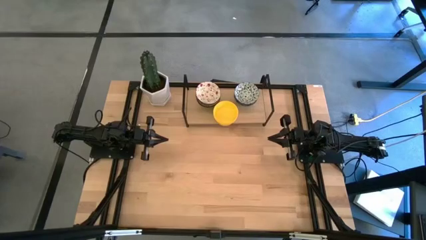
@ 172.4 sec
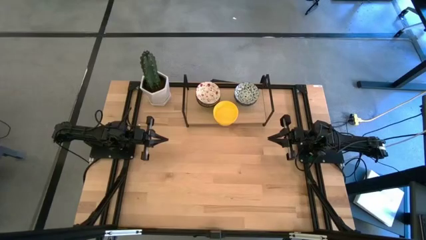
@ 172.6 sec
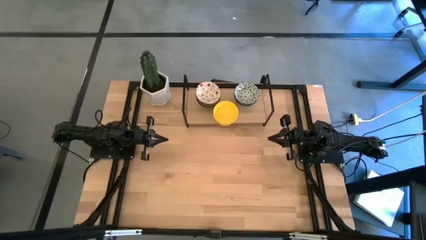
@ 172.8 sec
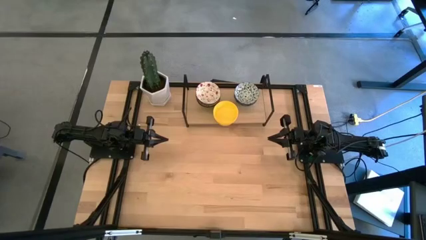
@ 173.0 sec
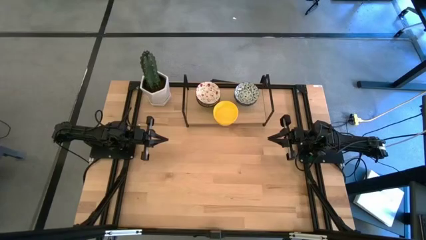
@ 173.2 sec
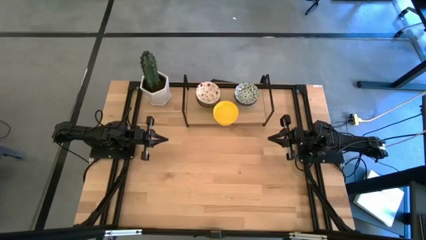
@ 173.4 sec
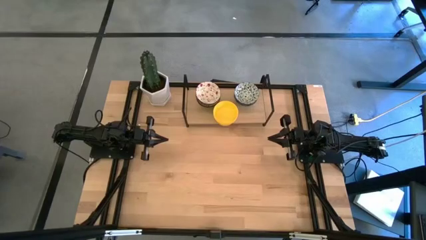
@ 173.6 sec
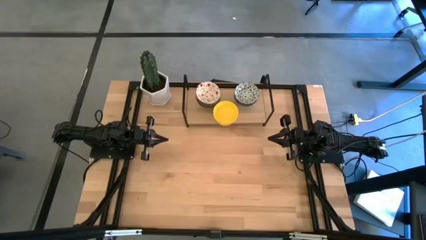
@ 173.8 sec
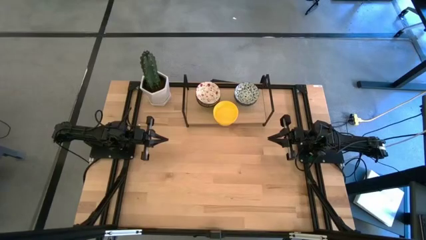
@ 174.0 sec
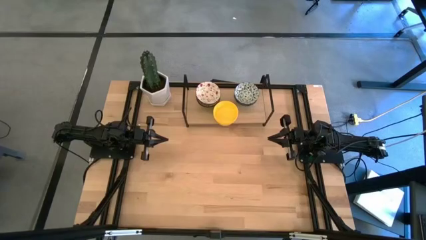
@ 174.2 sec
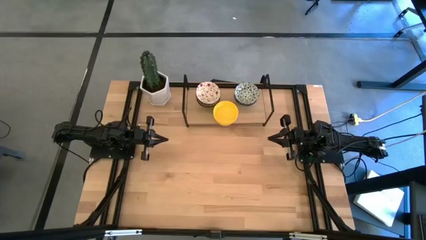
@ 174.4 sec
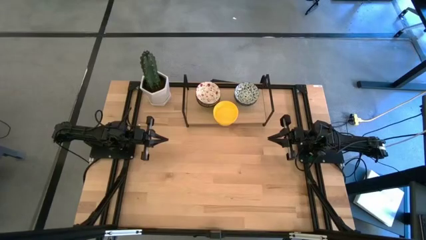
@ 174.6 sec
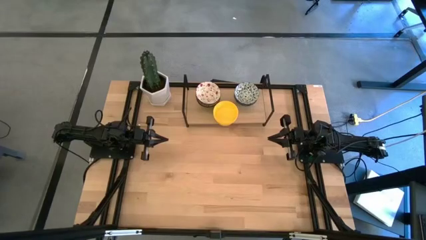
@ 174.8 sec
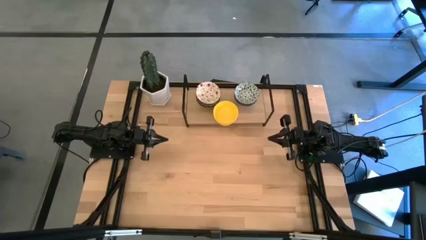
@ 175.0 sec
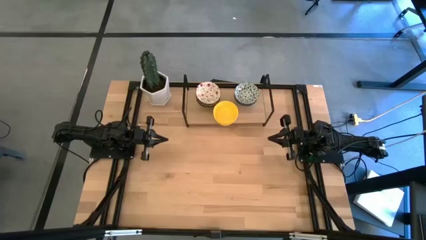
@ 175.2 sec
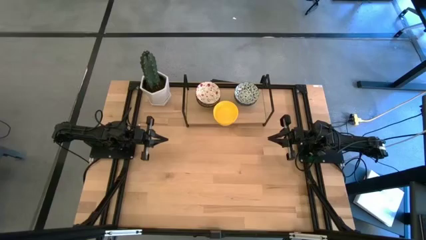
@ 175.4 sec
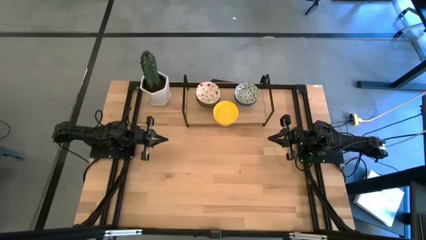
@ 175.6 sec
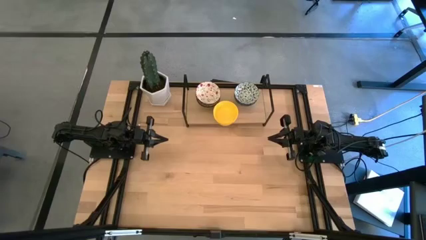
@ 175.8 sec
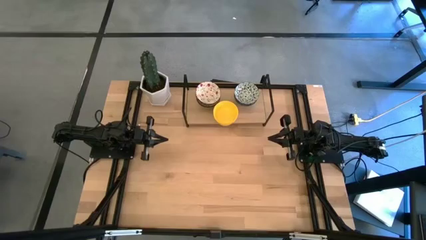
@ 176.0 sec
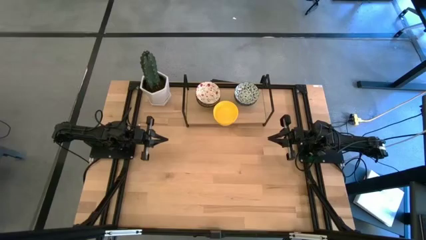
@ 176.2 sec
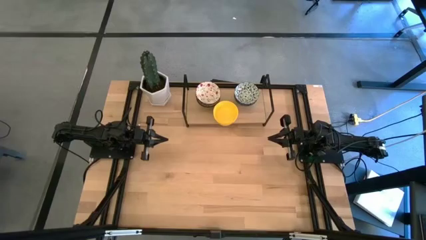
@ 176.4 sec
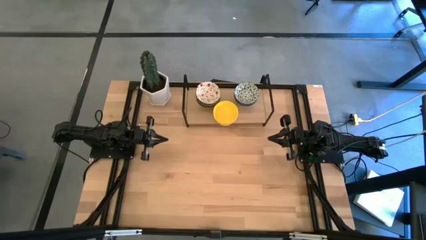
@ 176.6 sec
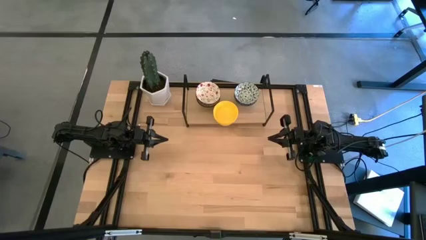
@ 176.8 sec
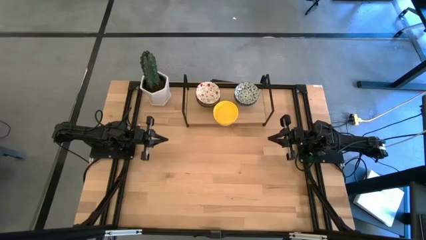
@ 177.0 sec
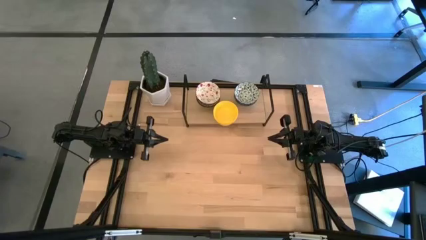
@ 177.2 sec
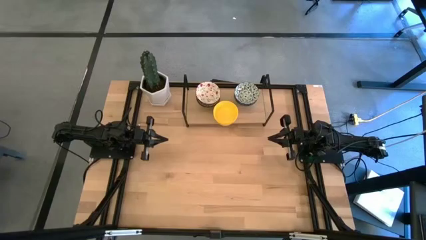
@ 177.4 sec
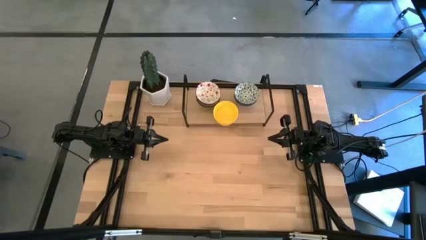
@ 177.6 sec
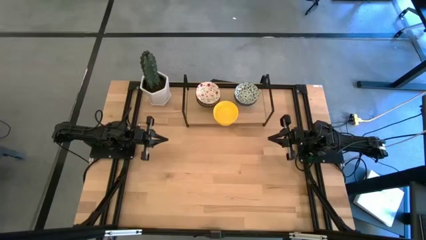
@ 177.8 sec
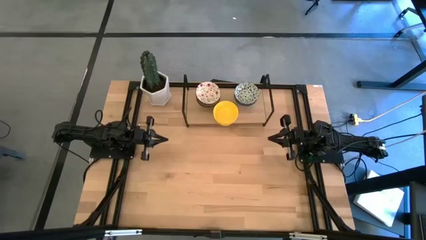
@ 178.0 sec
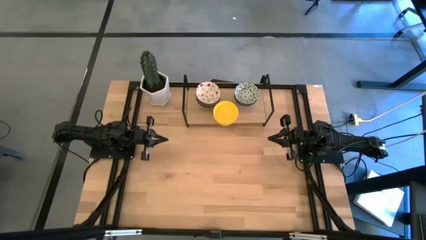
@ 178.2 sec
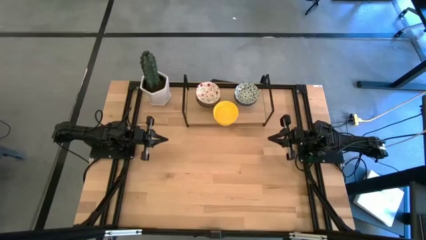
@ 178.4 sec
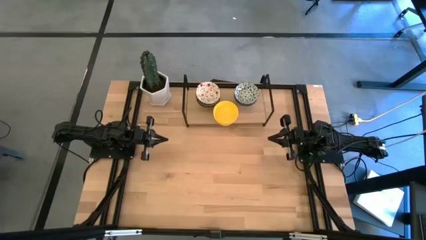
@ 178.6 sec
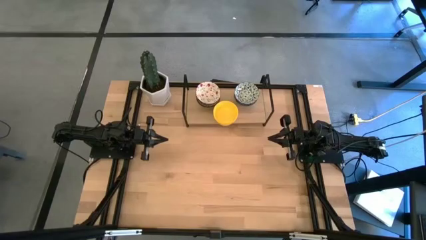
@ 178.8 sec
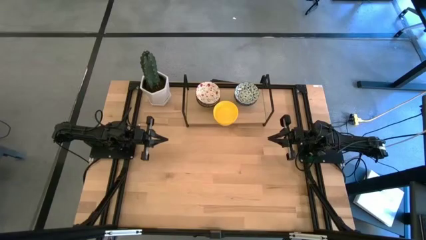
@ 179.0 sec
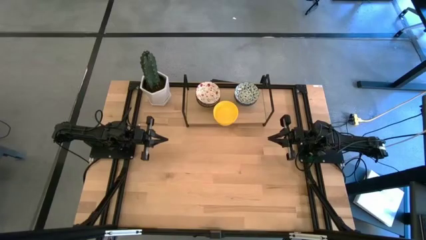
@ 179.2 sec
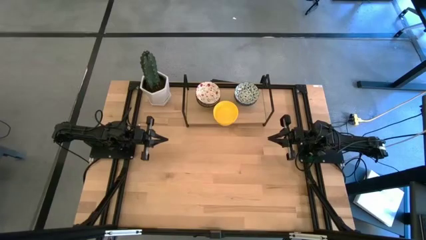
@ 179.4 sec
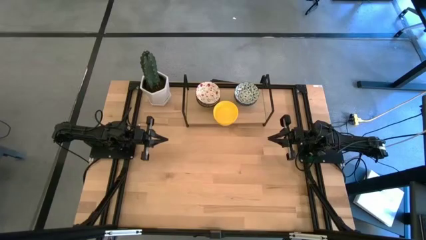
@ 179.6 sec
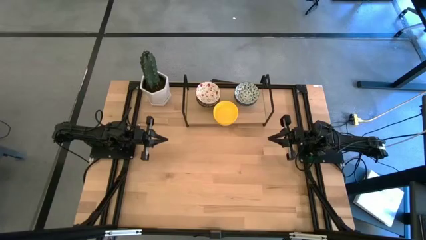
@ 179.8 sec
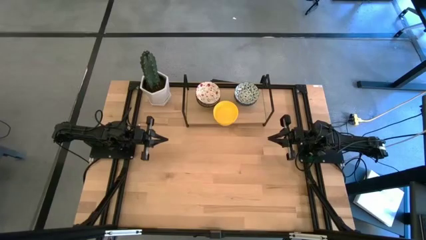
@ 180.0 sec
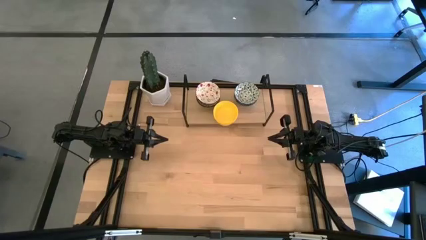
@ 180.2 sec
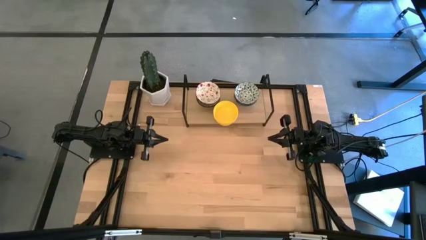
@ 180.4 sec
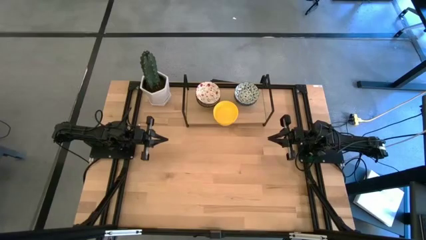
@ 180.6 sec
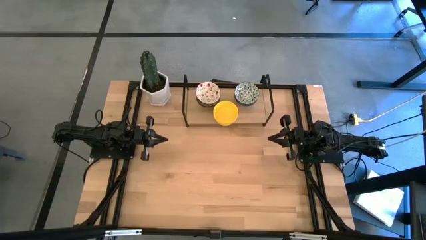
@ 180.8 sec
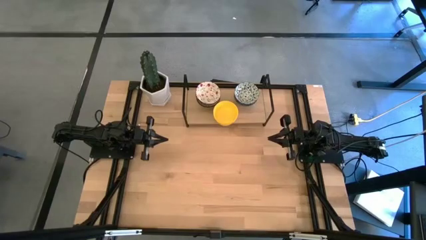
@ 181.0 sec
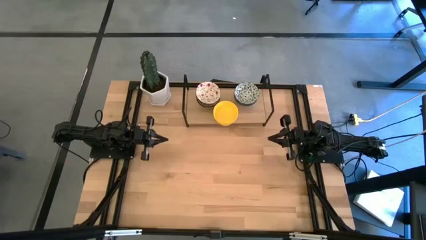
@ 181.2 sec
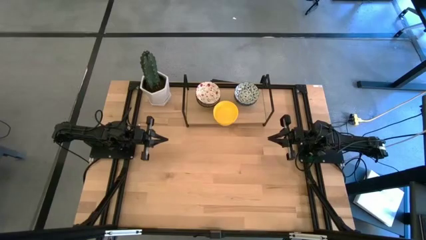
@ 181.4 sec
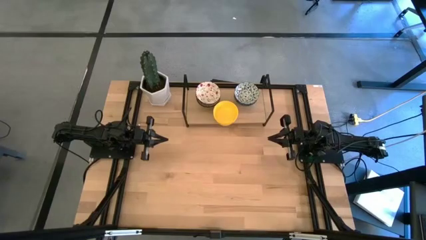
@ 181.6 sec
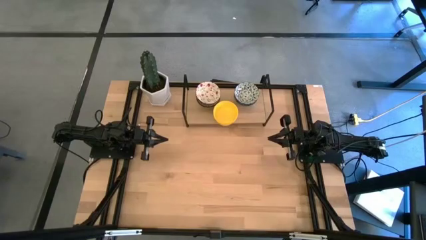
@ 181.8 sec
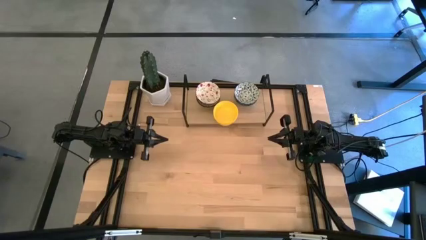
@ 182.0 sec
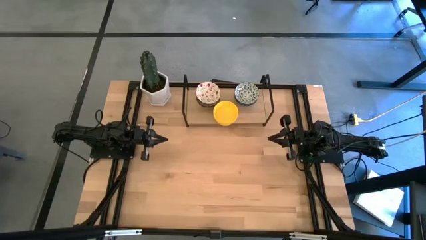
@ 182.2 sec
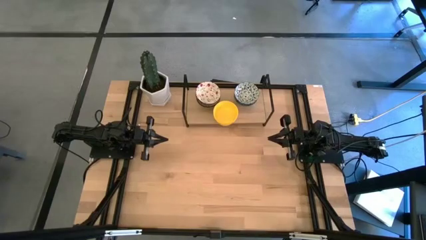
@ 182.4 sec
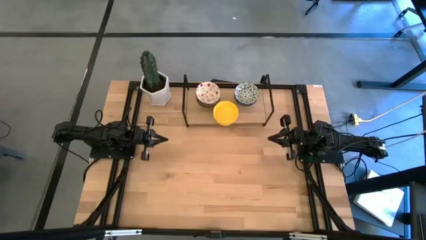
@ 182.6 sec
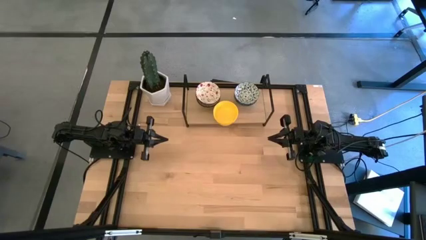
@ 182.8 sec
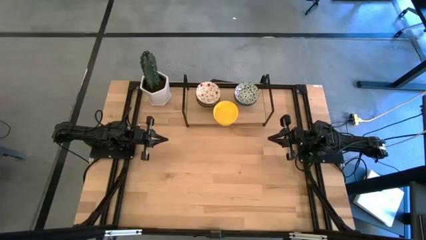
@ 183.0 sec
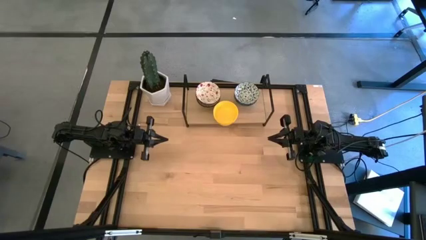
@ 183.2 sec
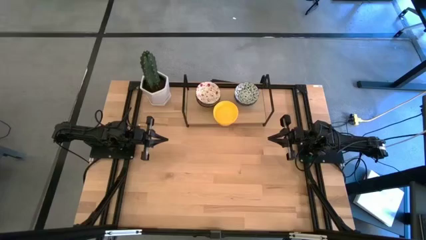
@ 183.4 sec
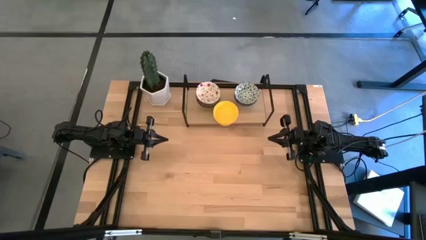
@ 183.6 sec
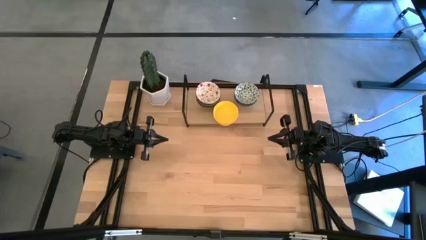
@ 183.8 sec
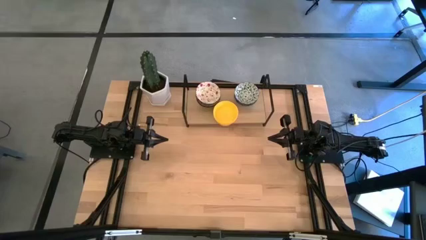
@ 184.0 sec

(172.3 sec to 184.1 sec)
Task: Pick & Place Mini bowls
Return to Home Position

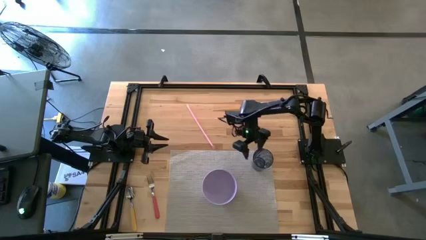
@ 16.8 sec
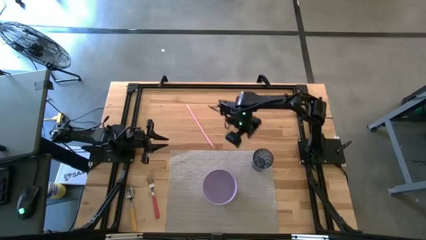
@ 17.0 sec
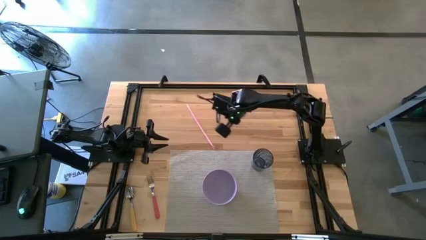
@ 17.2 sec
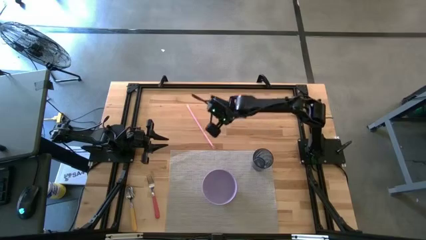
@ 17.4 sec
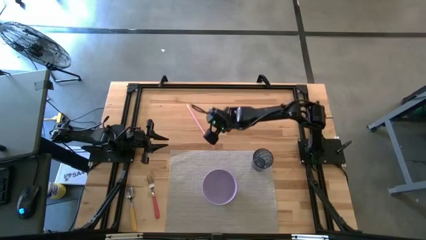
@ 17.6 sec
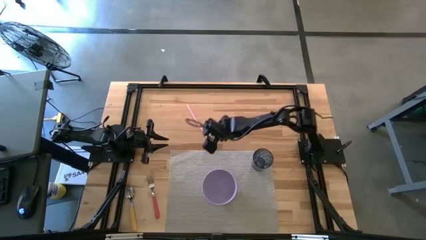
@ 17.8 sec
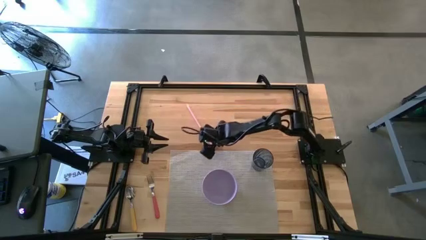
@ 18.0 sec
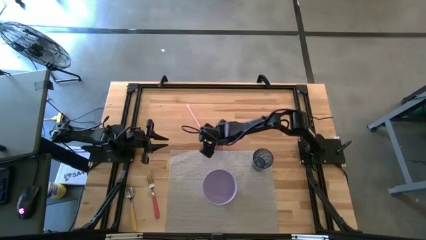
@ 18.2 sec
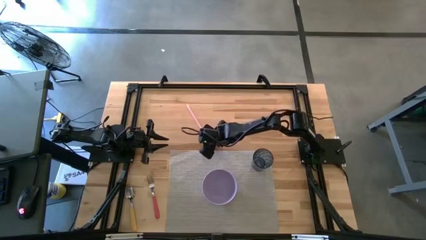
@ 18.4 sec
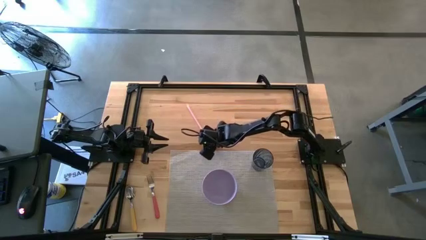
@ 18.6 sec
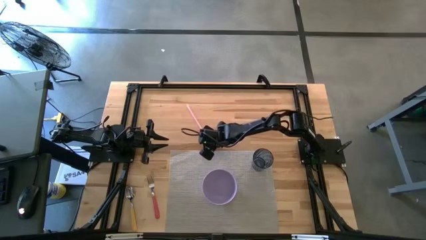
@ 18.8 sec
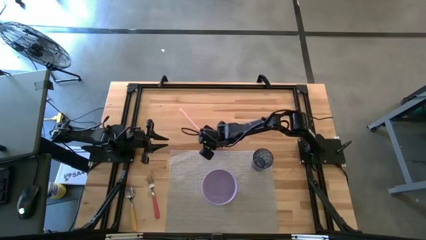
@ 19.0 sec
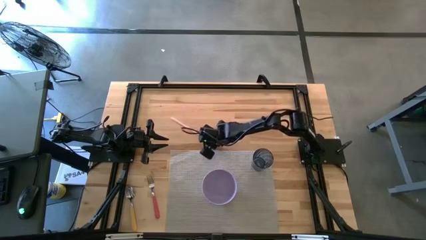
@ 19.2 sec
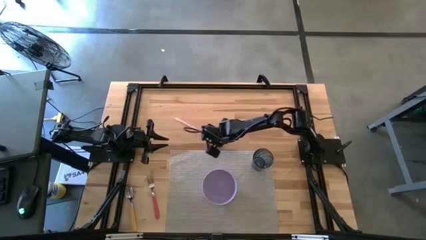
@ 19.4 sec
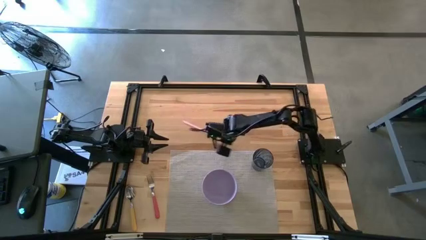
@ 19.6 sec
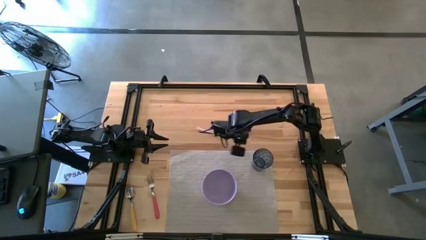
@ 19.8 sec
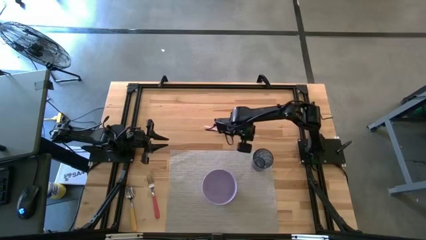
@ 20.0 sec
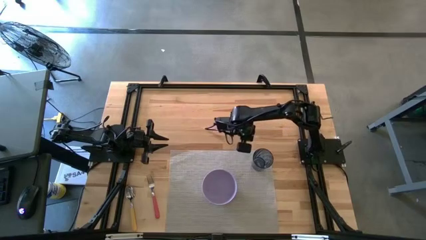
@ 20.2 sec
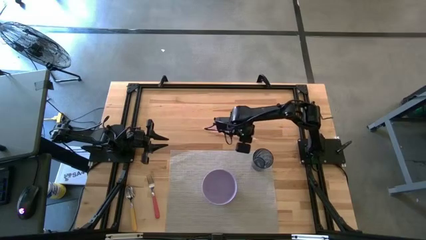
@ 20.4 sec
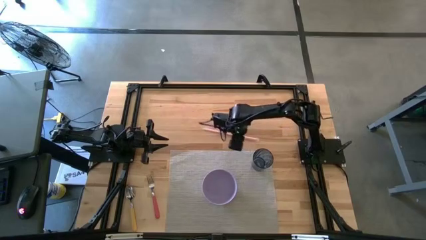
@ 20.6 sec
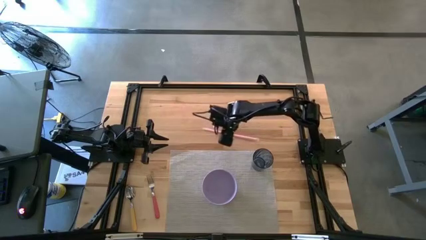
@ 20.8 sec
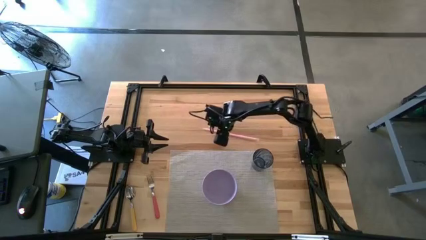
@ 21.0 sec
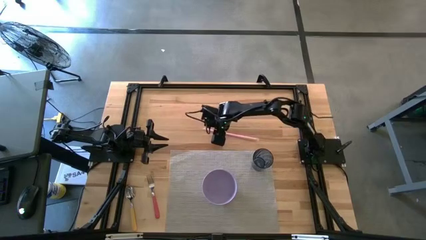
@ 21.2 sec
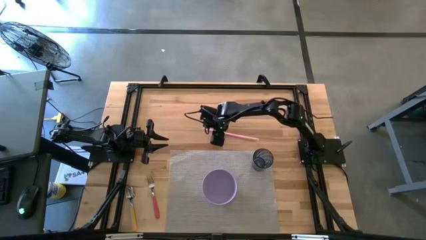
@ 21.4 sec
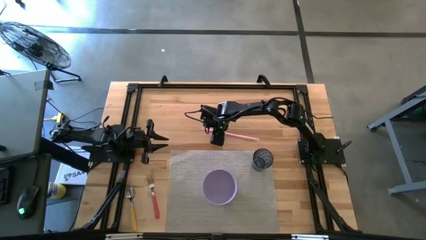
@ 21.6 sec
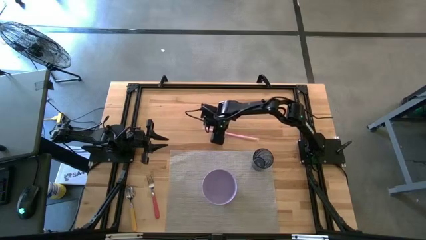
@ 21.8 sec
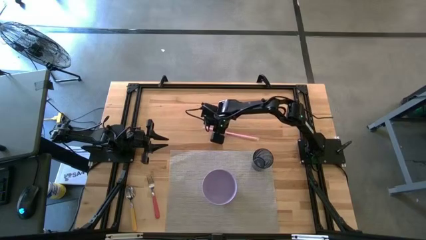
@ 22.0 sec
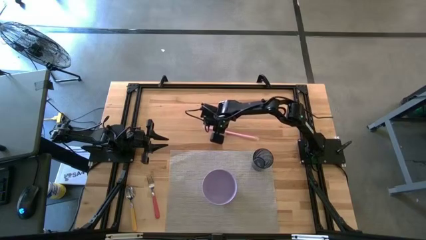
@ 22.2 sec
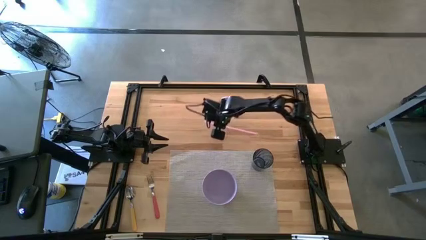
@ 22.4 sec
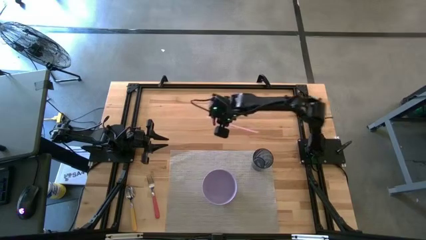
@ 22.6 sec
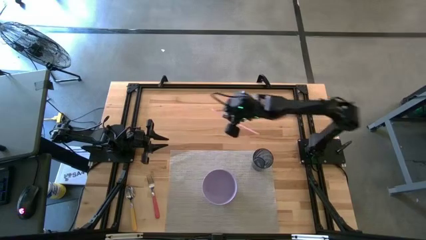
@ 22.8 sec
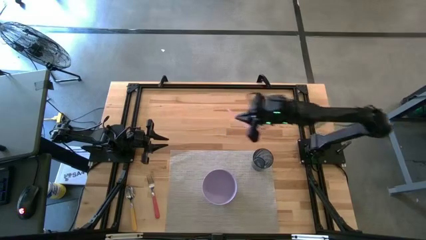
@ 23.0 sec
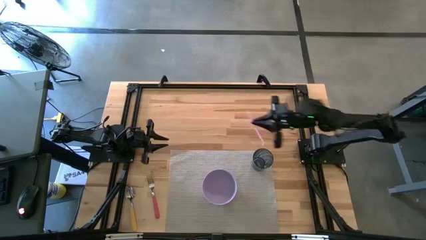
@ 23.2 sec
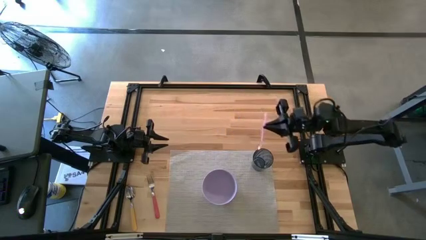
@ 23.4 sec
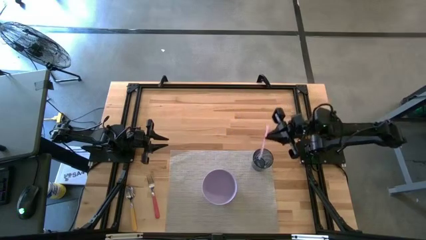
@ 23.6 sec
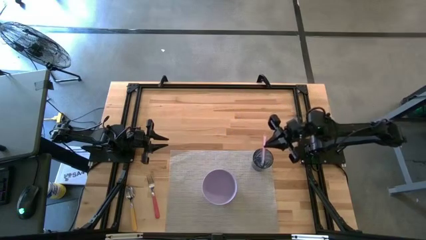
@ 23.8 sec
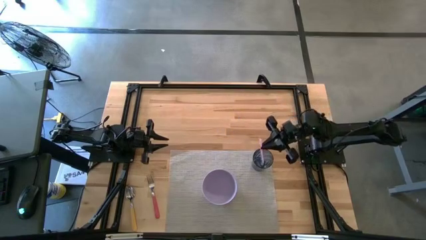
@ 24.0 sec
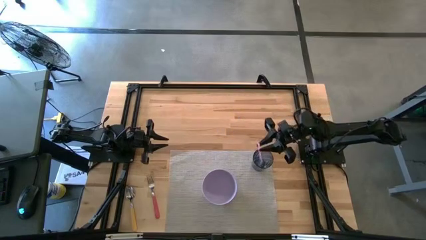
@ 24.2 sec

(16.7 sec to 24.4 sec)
Task: Pick & Place Utensil
Put the pink straw into the blue cup on the gray mat
